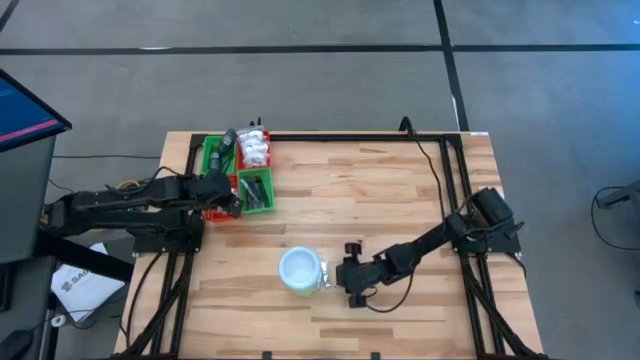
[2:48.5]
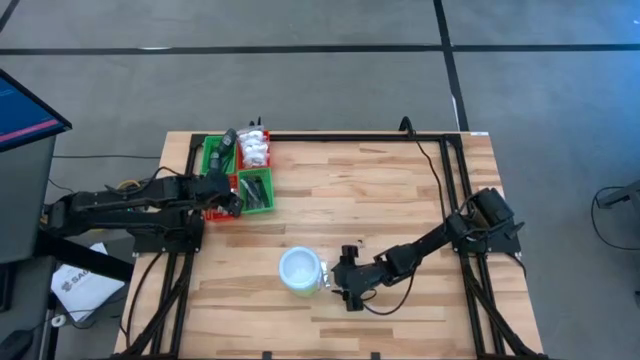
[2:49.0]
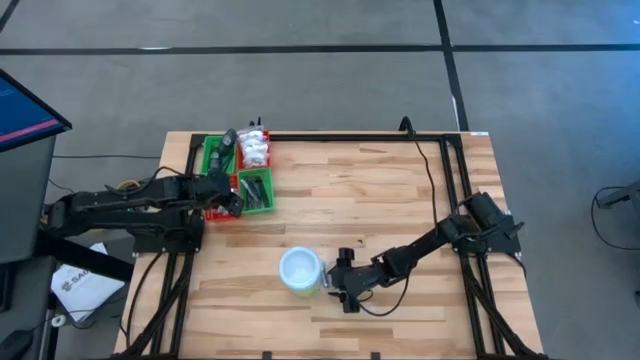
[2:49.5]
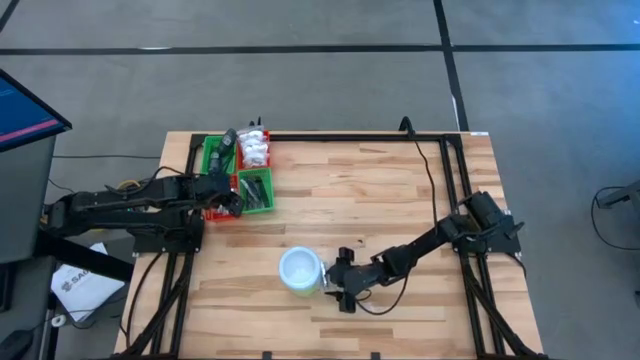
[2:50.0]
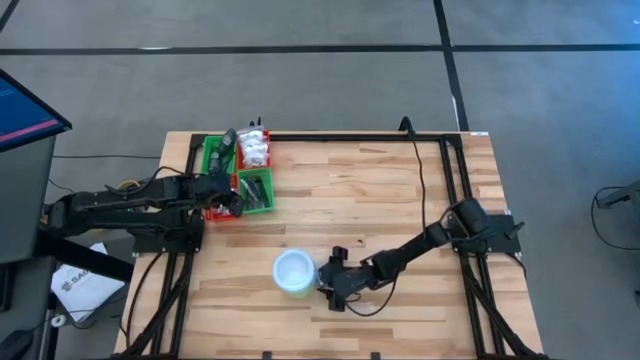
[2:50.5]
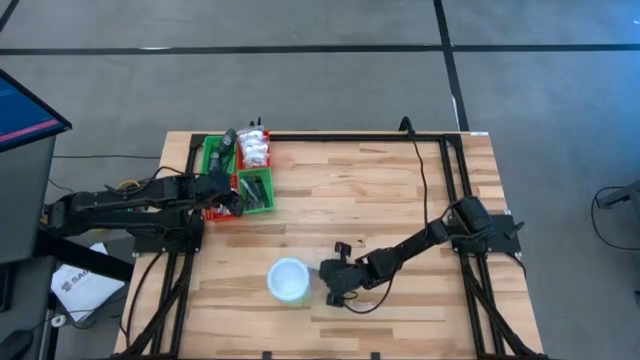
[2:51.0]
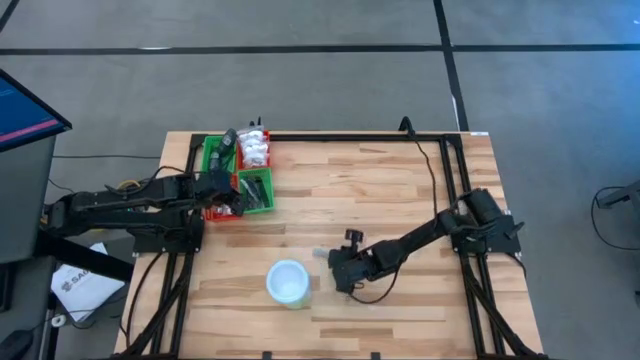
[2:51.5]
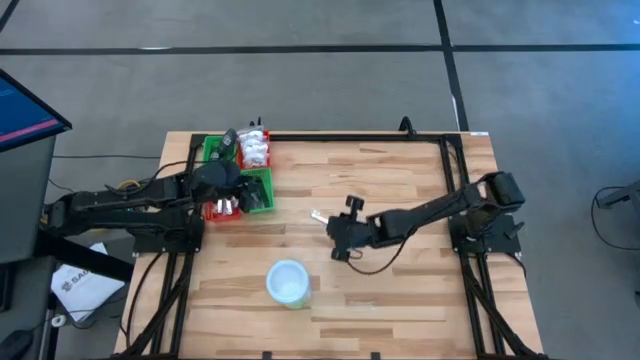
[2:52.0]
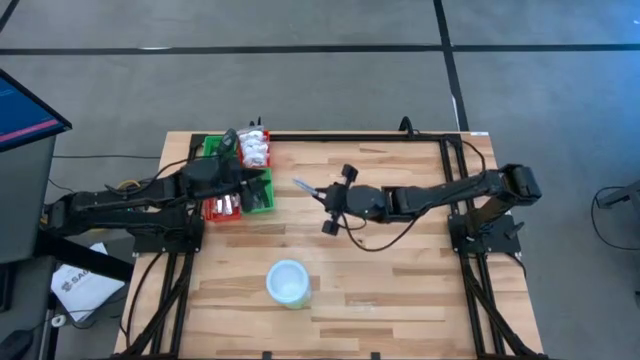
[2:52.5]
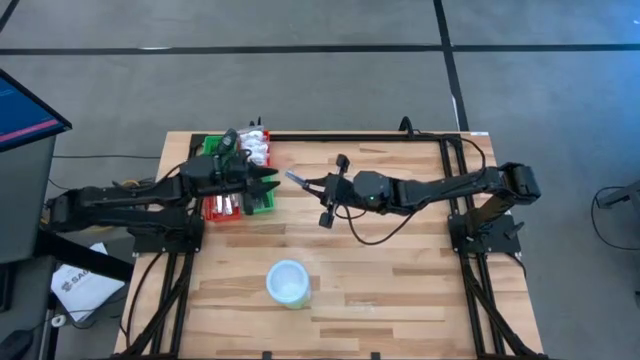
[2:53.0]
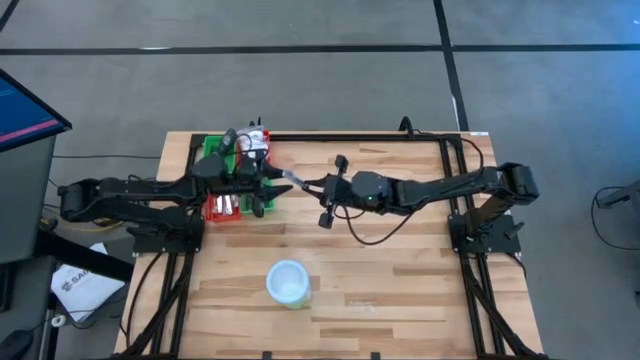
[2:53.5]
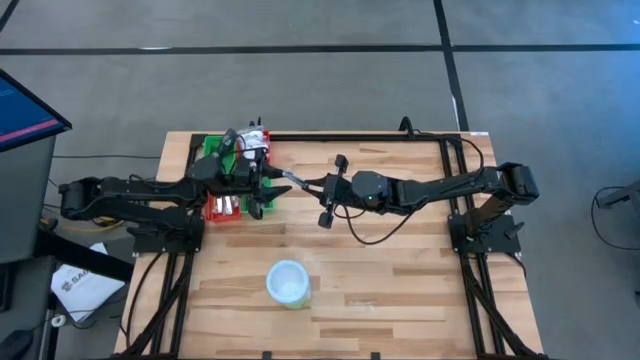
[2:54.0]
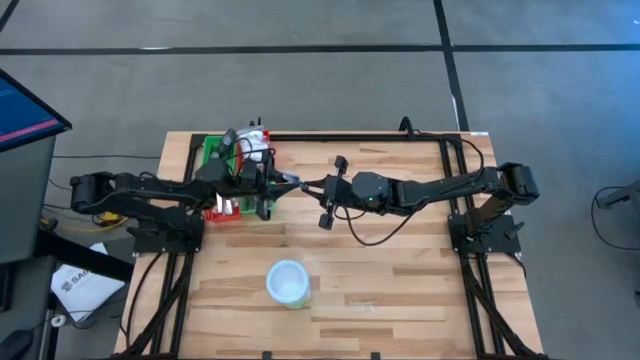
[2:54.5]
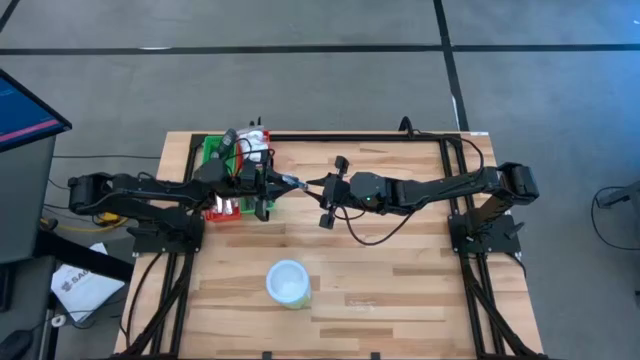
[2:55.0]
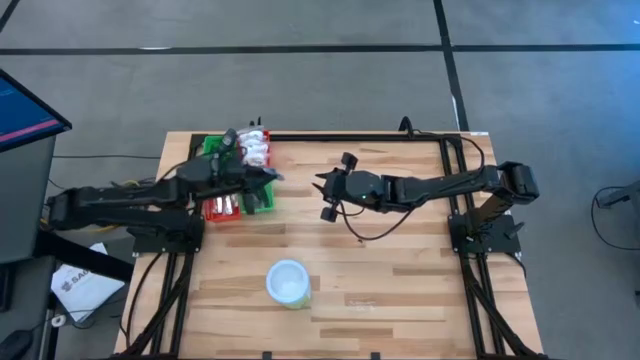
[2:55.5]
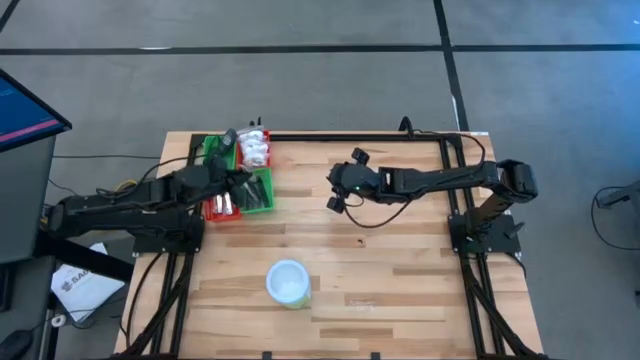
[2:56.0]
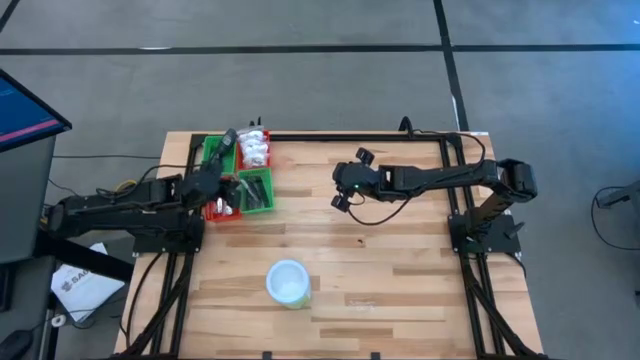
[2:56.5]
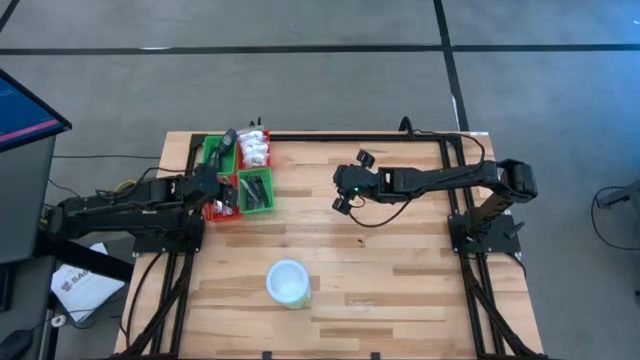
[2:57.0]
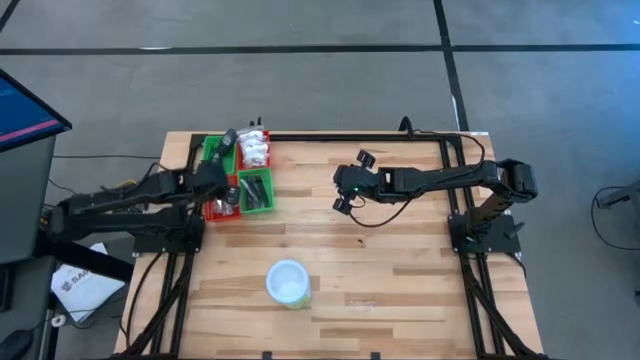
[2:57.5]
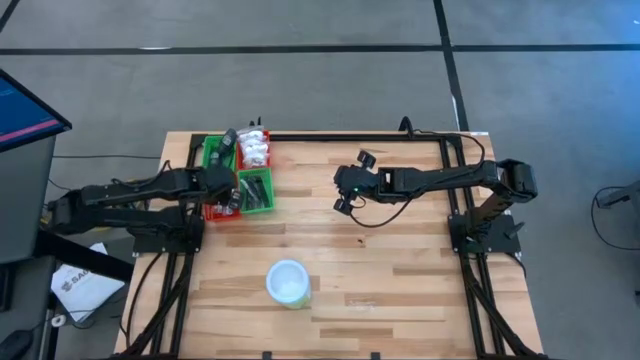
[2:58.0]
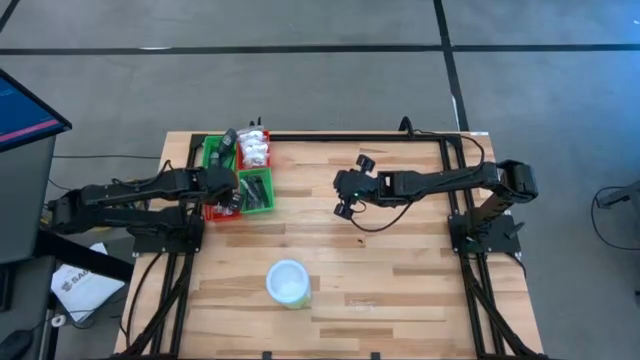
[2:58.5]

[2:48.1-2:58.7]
Task: Pick & Place Travel size toiletries
Put the silver nail cutter into the bottom red bin

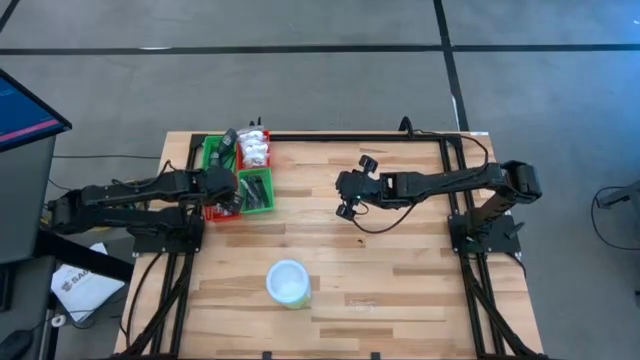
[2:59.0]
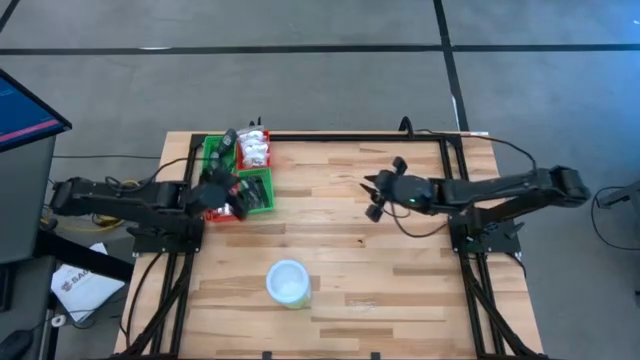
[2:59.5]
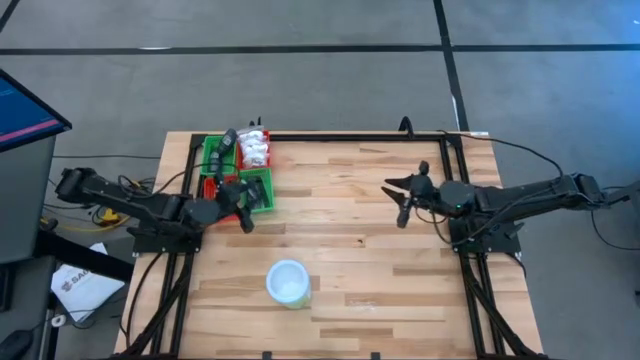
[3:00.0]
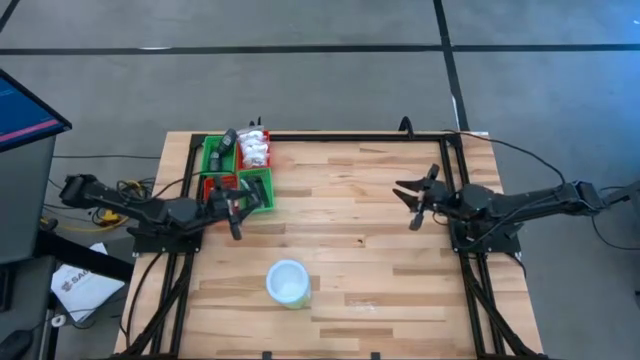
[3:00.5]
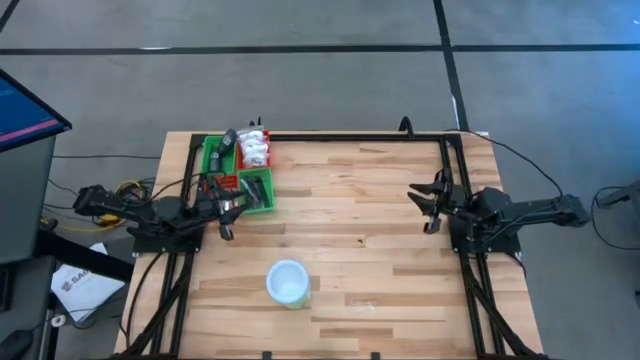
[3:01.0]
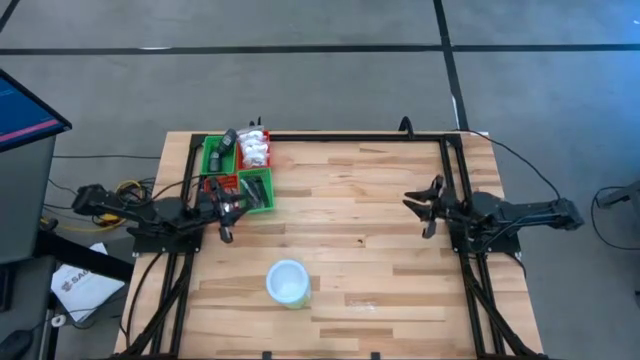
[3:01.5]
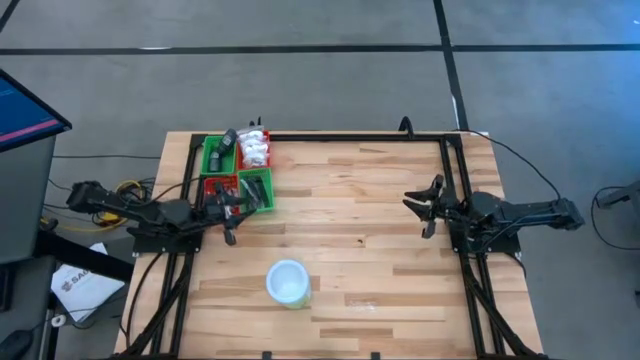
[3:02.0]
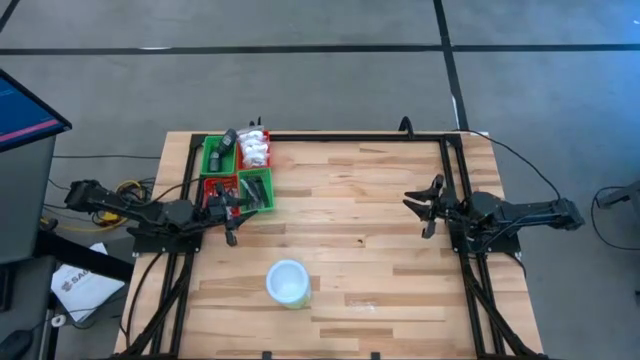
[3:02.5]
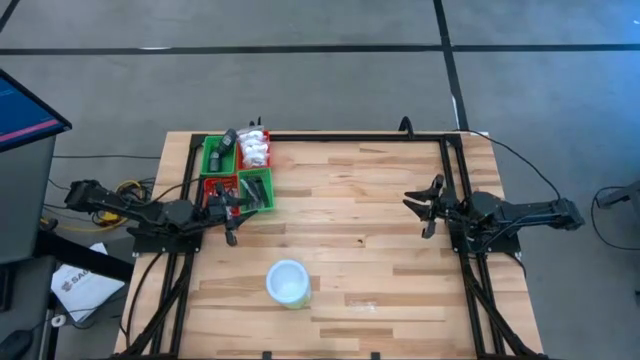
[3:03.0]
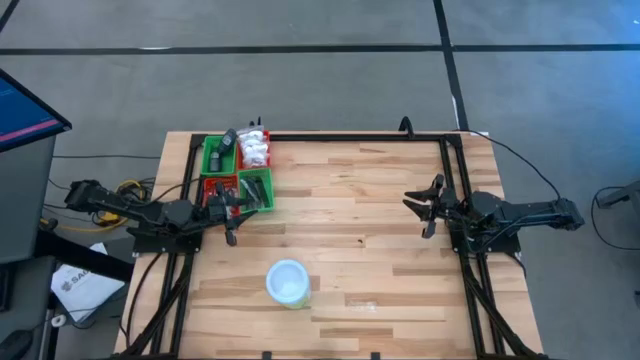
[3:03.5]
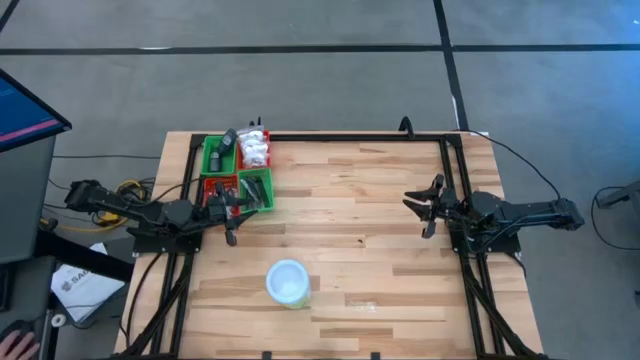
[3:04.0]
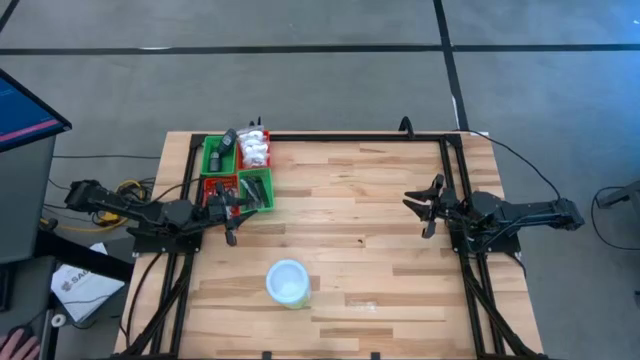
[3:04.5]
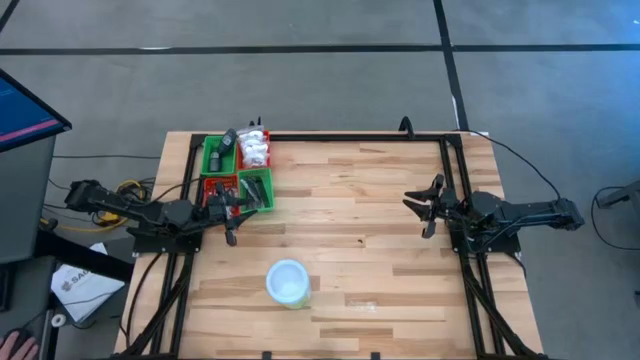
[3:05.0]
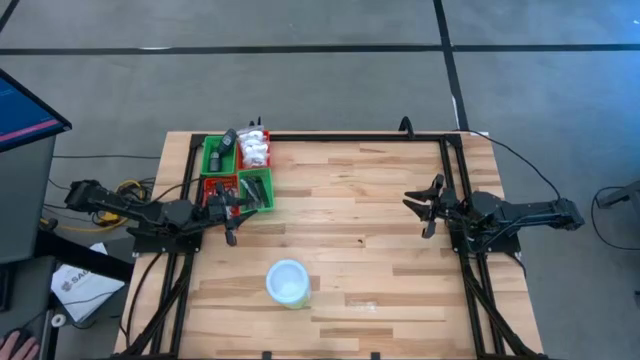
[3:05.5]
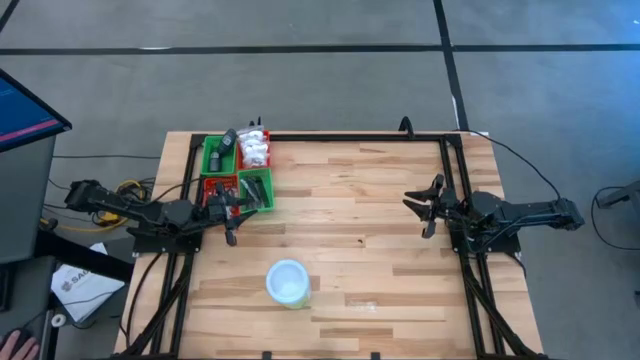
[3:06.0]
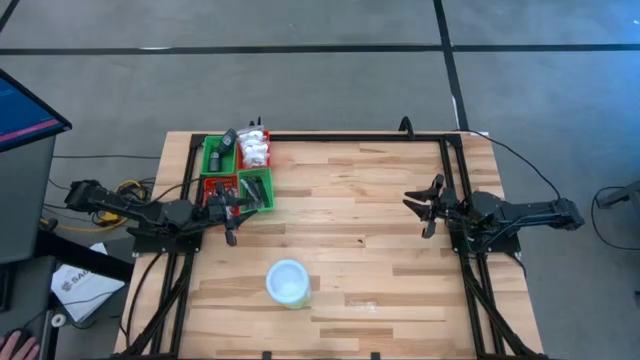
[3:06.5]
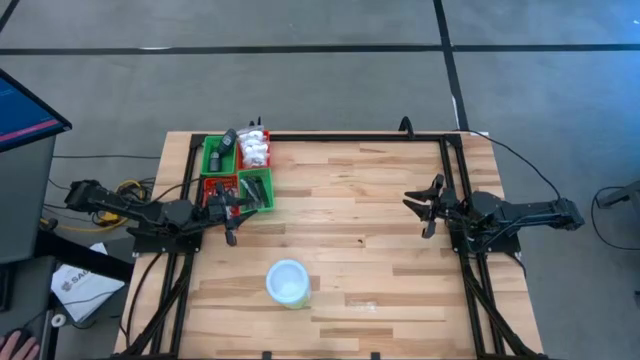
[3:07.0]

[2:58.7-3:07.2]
Return to Home Position

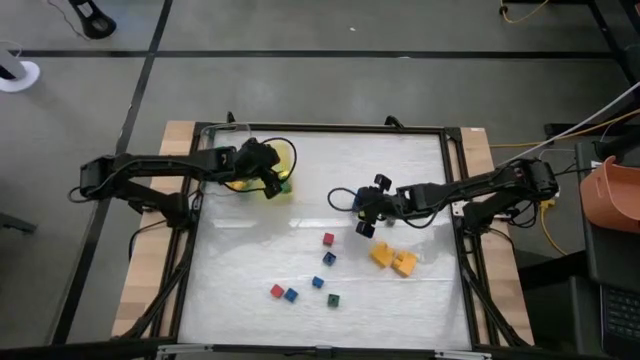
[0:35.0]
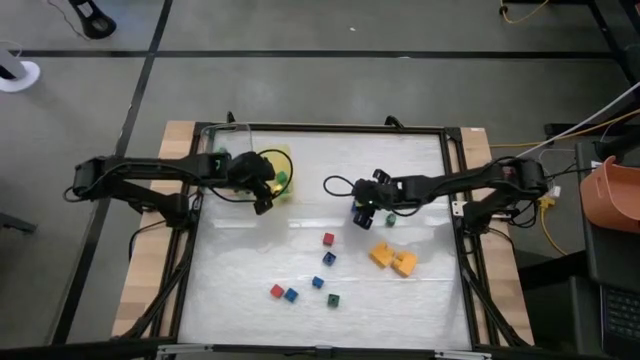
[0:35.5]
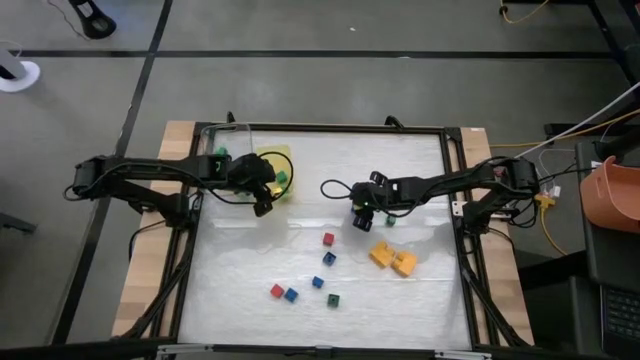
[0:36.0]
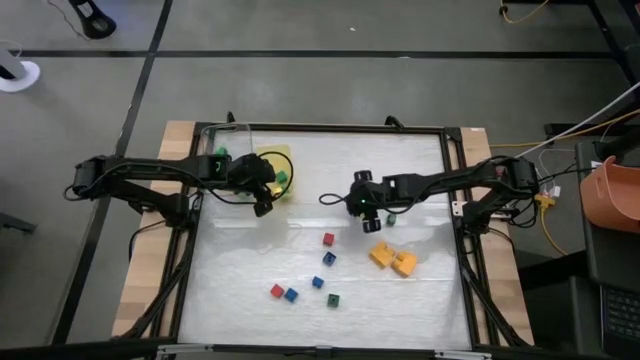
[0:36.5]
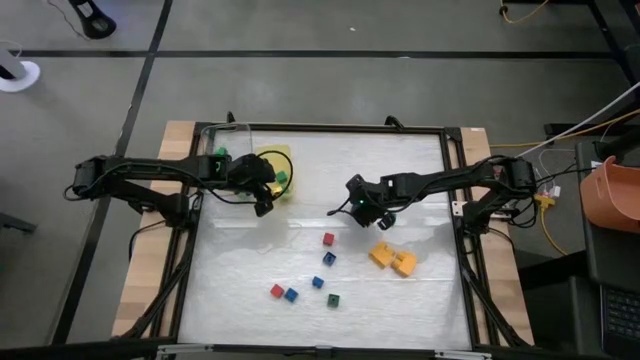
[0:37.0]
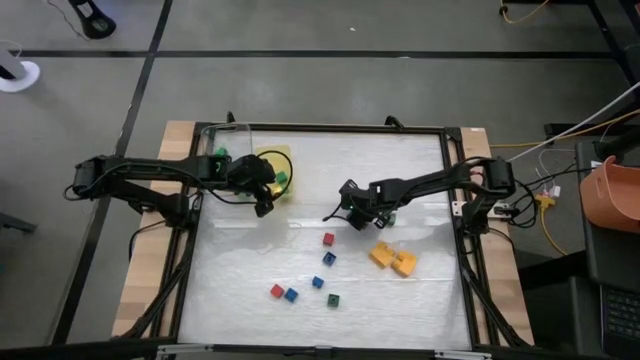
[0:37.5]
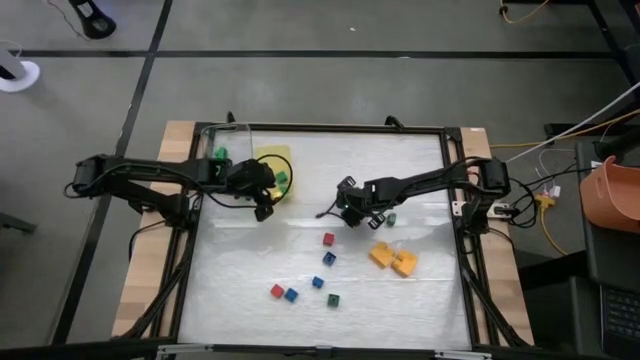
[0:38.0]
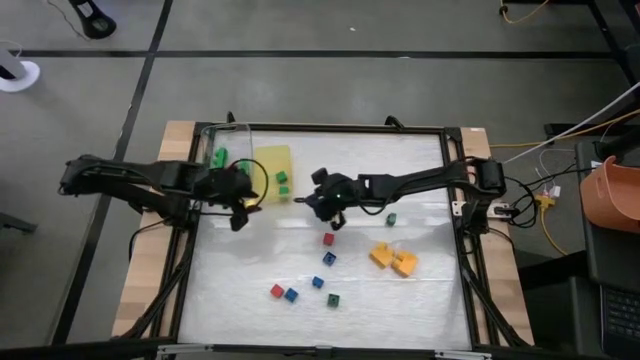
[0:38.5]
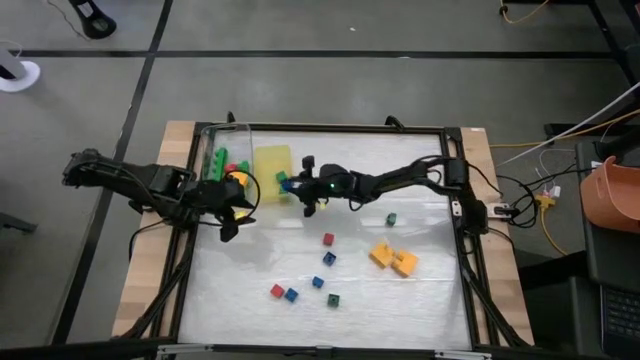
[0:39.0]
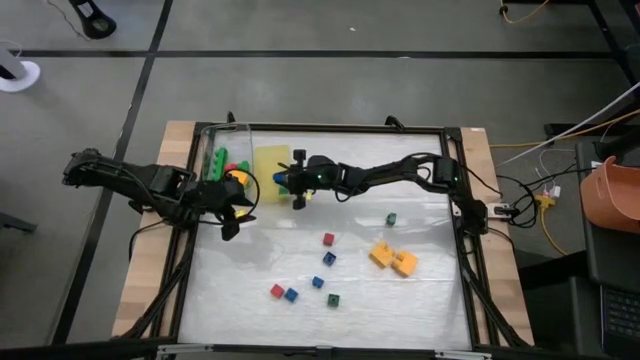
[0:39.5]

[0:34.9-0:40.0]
Task: Sort blocks by size
Put the small blue game piece into the yellow bin
